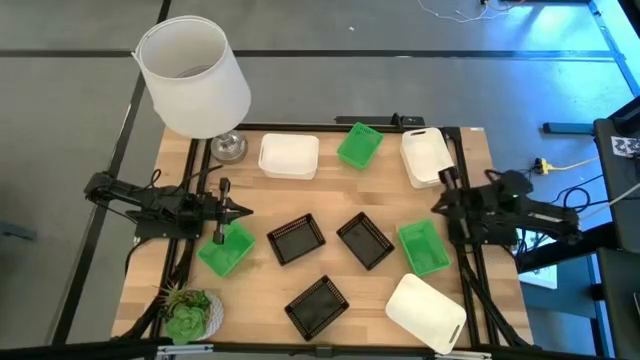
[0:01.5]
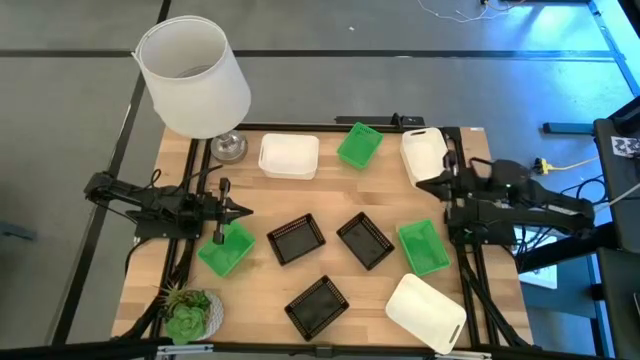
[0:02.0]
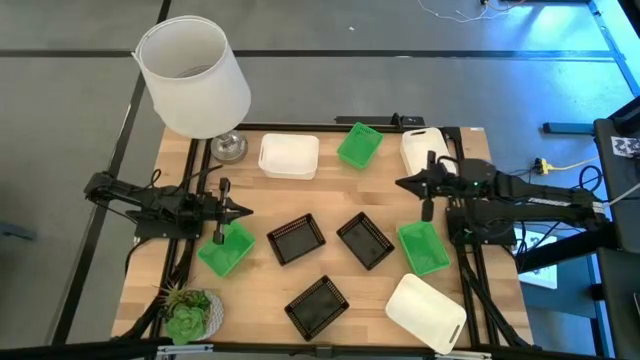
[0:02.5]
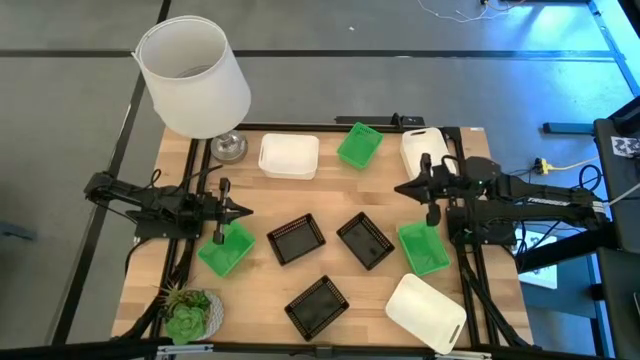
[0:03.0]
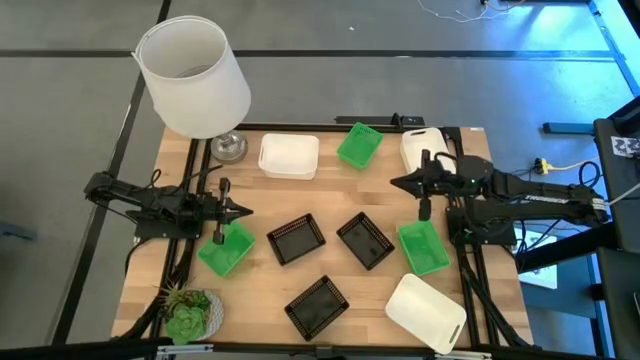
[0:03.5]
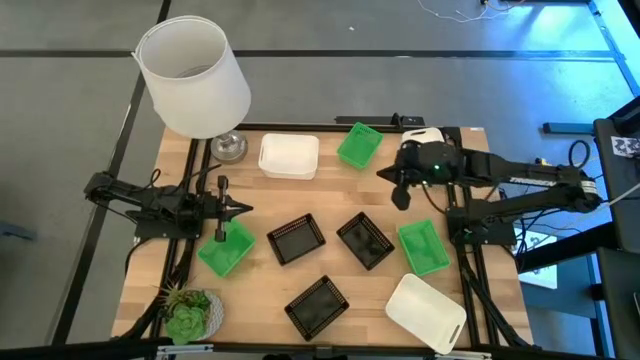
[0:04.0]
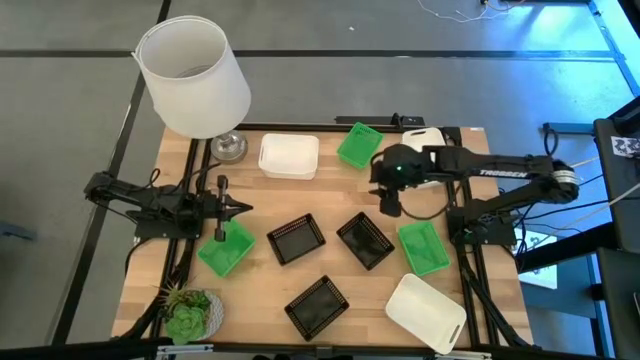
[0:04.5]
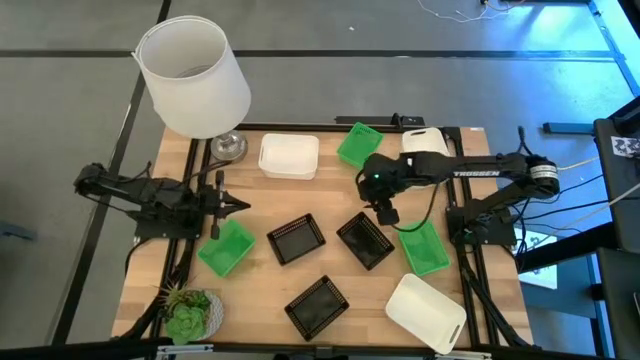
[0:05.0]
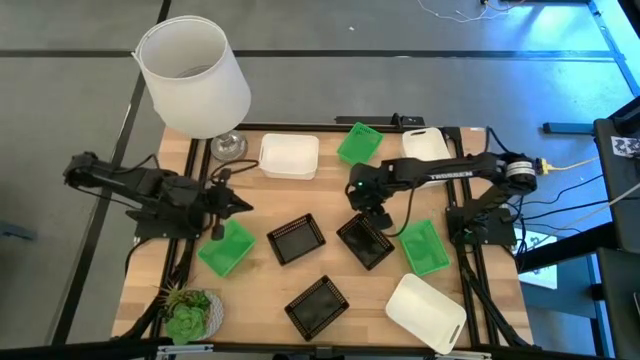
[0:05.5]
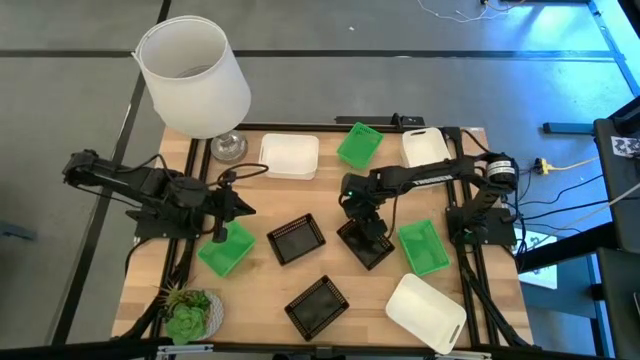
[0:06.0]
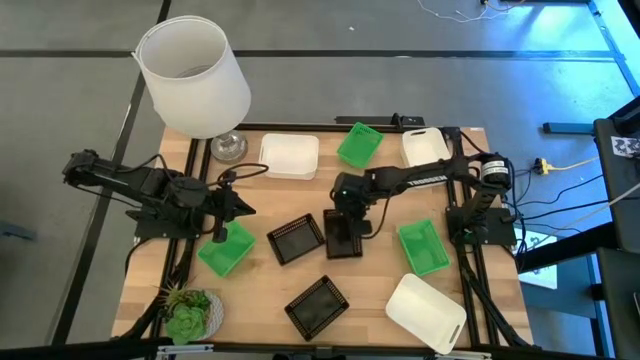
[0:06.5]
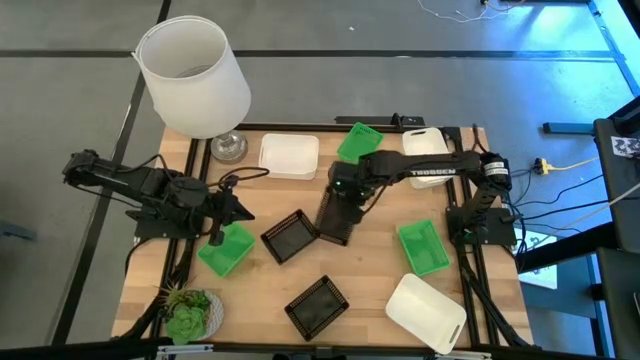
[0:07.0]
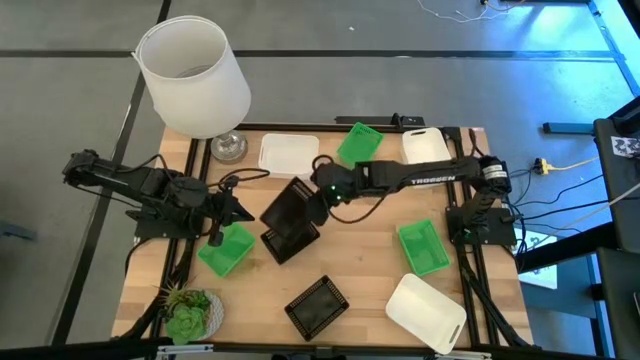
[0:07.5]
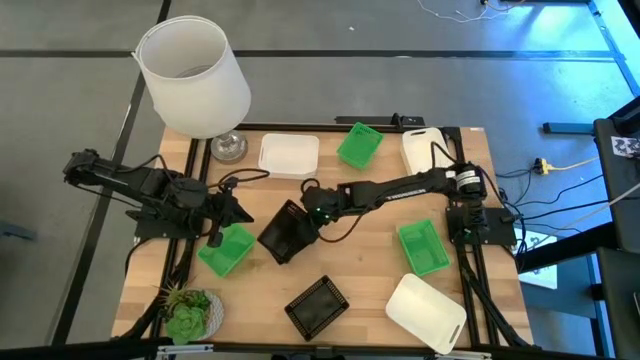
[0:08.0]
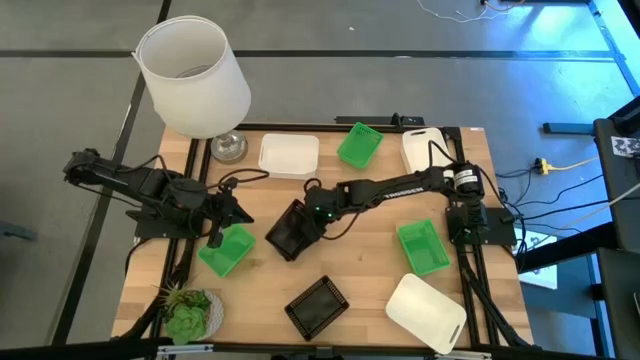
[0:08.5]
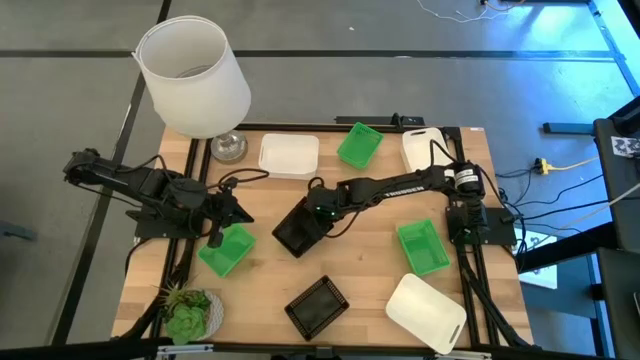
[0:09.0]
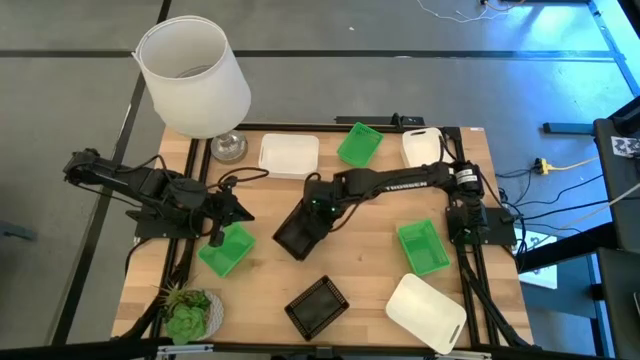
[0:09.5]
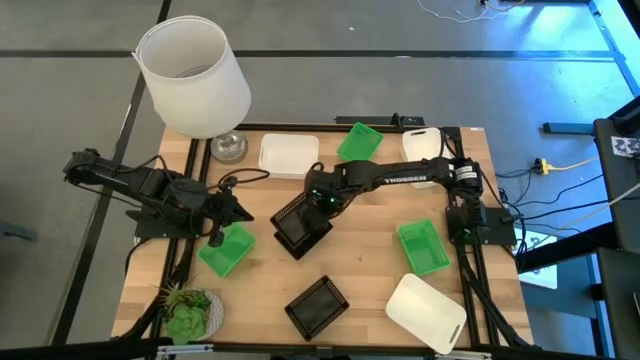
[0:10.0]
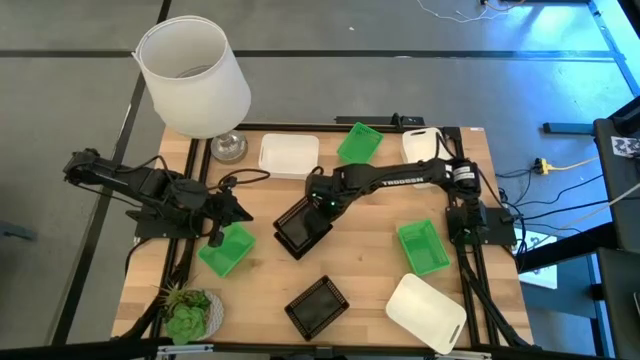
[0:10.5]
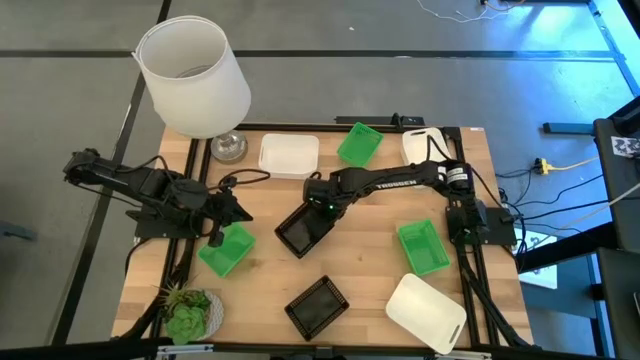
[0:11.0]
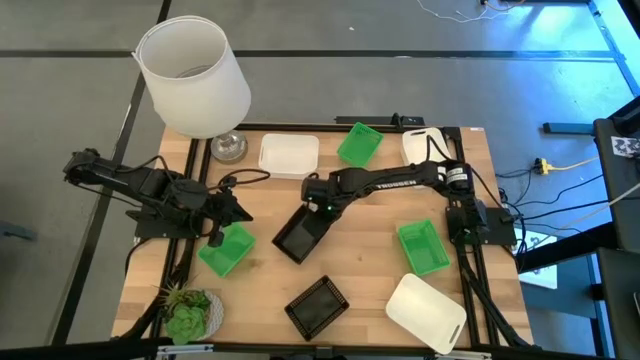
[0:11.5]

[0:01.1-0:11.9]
Stack the top right black bin on the top left black bin

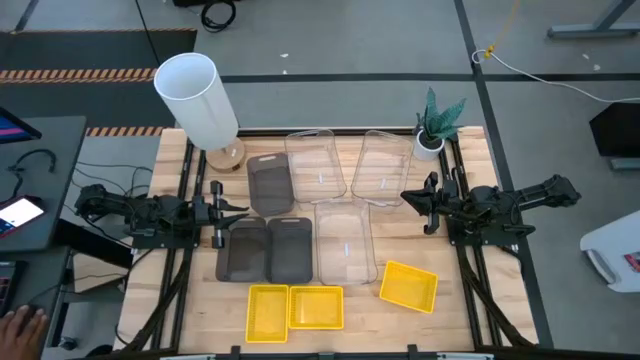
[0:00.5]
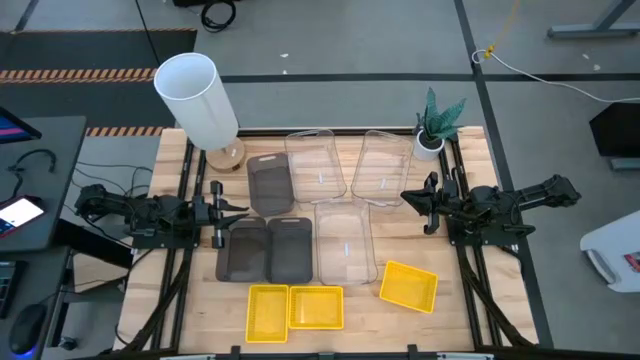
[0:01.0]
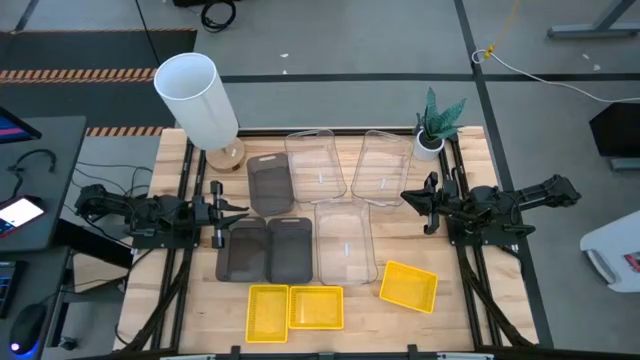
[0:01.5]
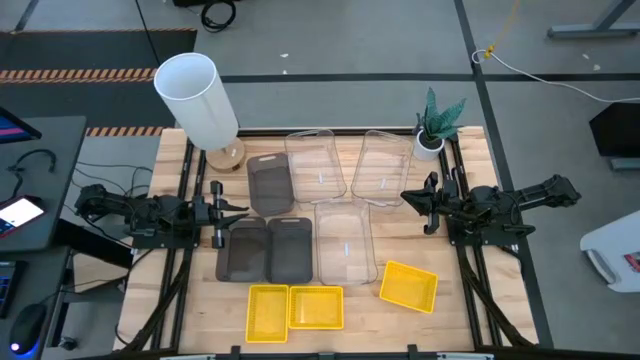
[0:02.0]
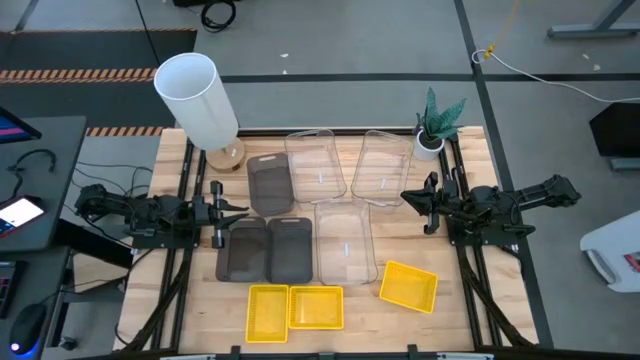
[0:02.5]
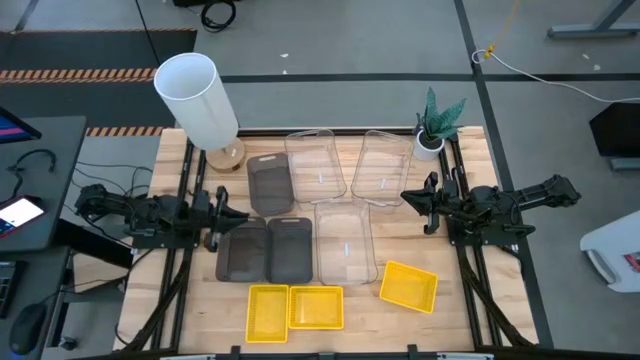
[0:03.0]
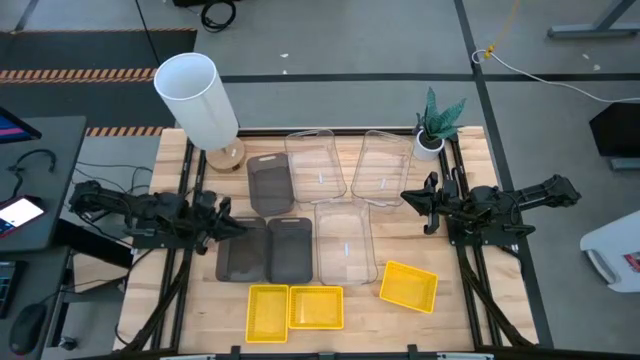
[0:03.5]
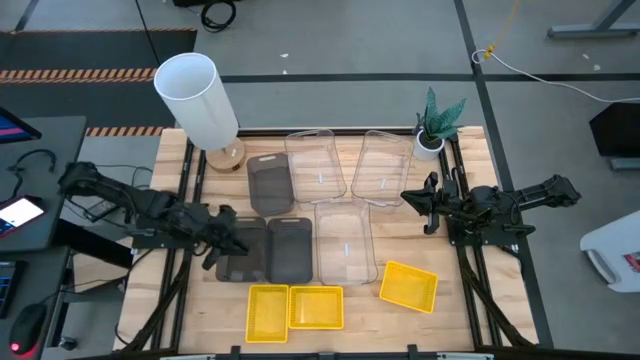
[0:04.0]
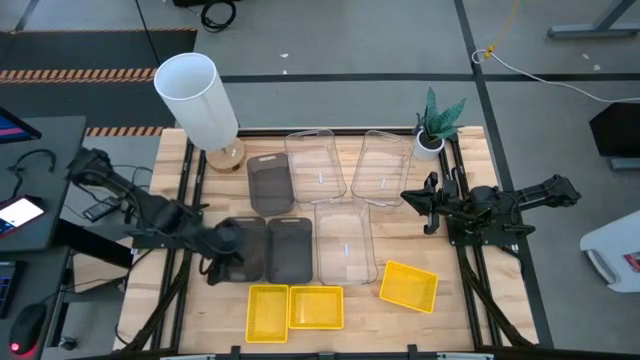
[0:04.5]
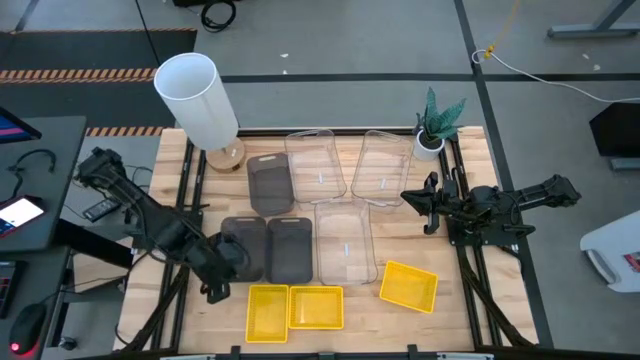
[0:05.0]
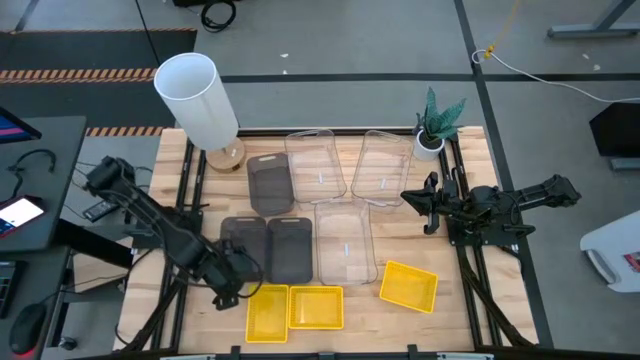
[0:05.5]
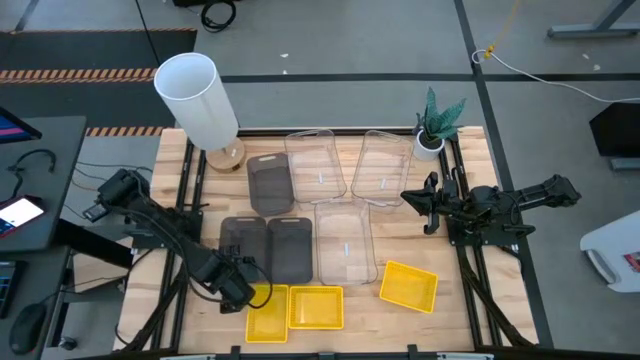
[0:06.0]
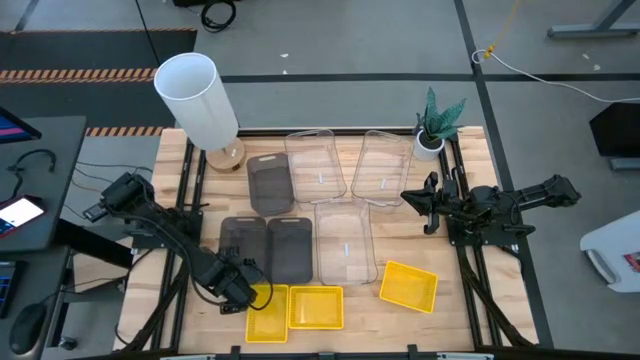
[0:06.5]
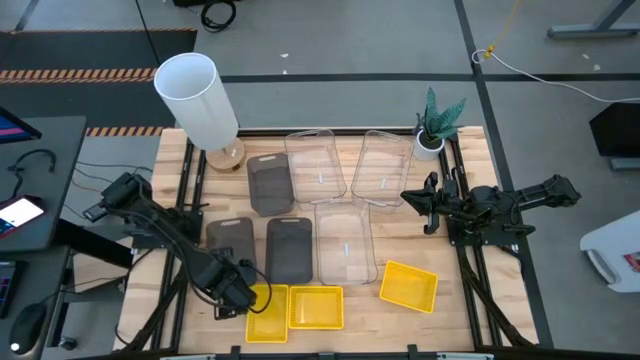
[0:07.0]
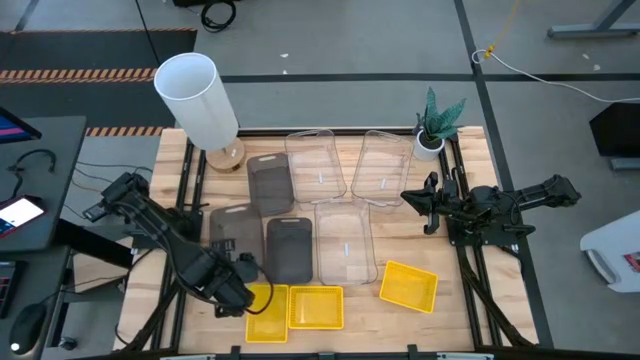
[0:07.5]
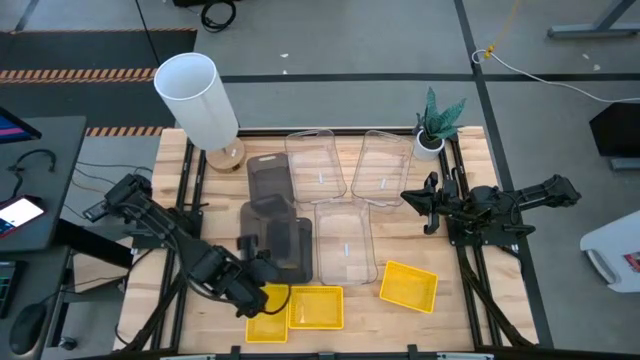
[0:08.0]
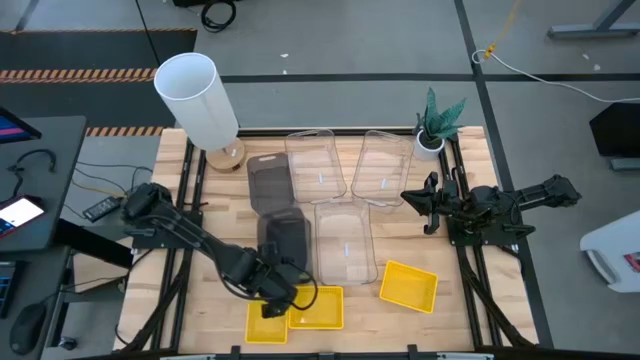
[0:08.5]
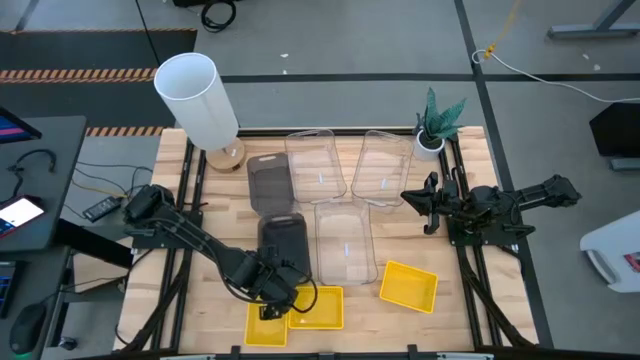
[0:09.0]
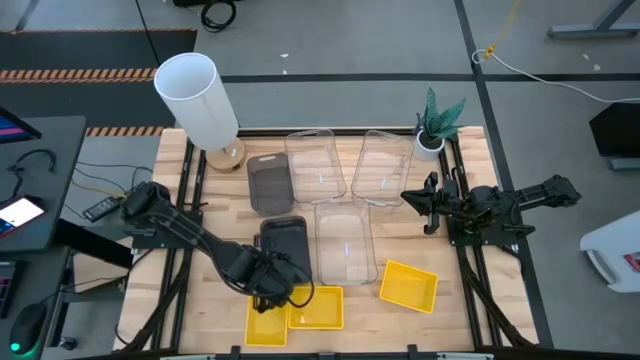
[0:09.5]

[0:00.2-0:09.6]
Stack the bottom left black bin on top of the bottom right black bin
